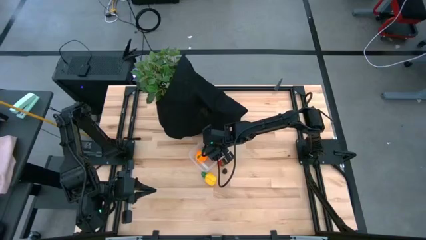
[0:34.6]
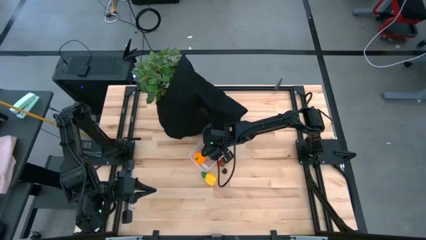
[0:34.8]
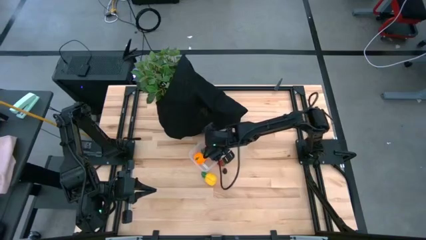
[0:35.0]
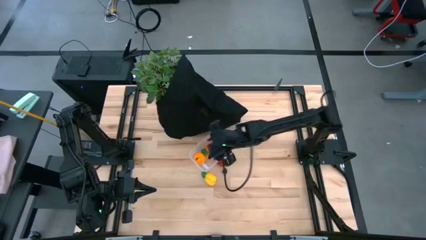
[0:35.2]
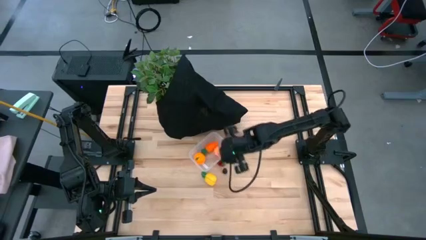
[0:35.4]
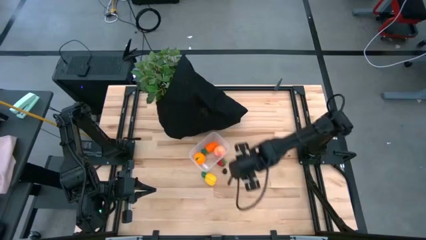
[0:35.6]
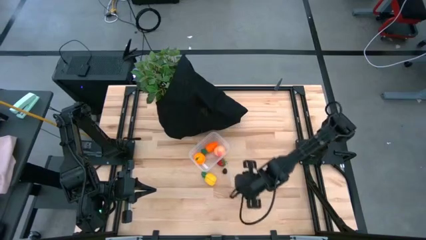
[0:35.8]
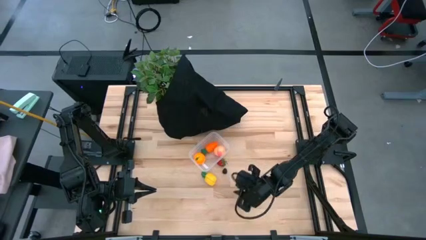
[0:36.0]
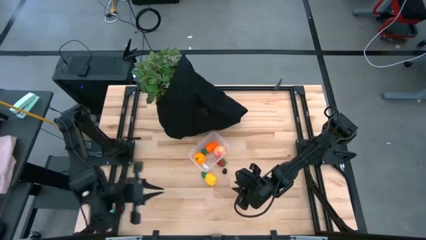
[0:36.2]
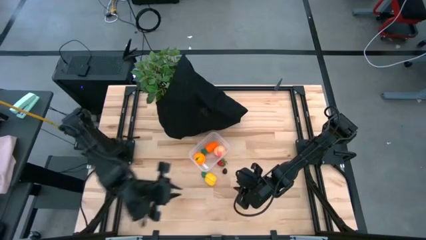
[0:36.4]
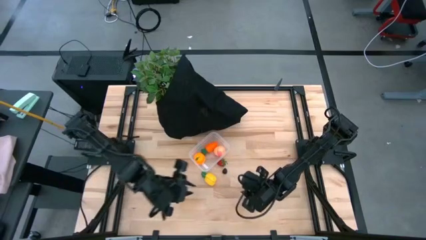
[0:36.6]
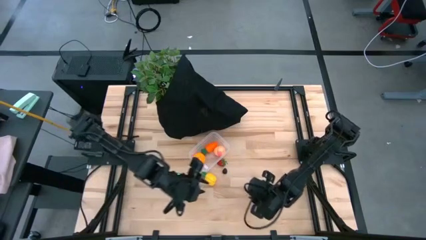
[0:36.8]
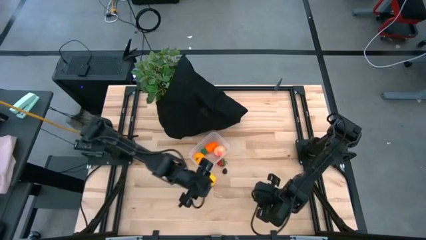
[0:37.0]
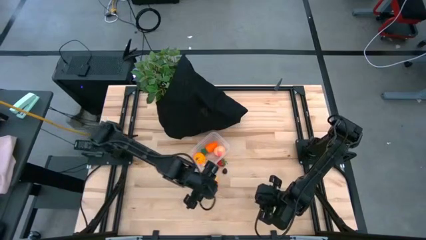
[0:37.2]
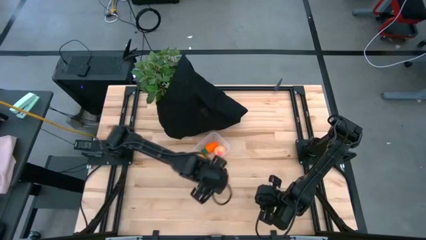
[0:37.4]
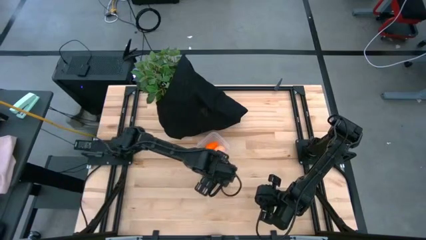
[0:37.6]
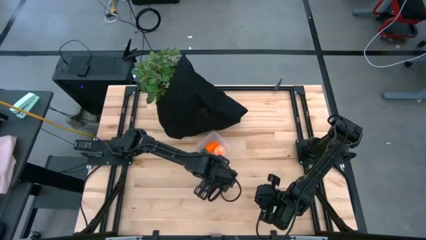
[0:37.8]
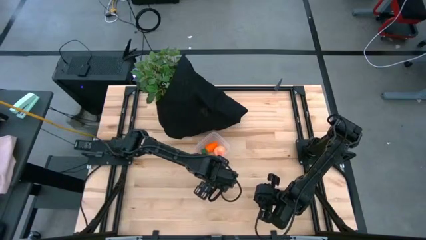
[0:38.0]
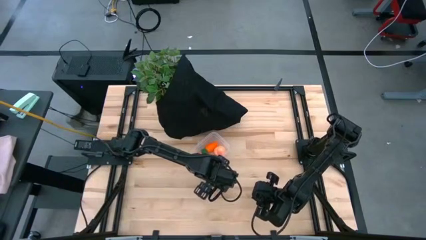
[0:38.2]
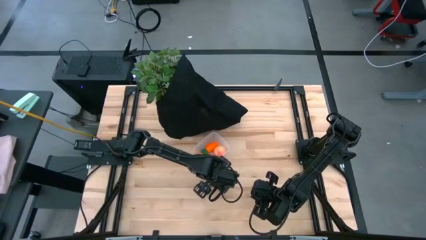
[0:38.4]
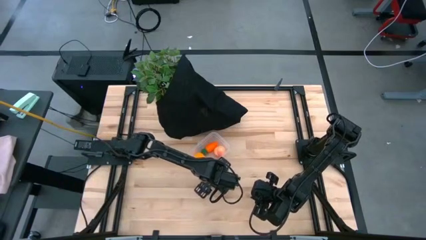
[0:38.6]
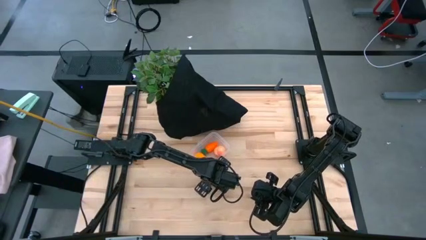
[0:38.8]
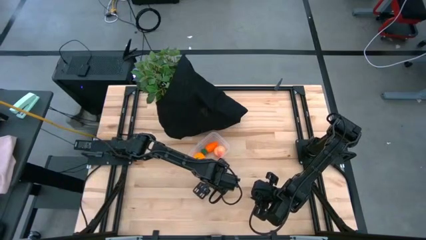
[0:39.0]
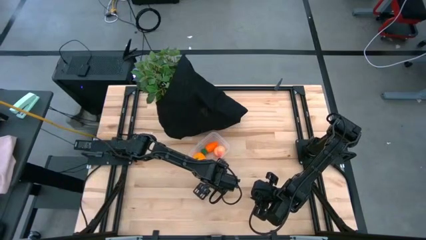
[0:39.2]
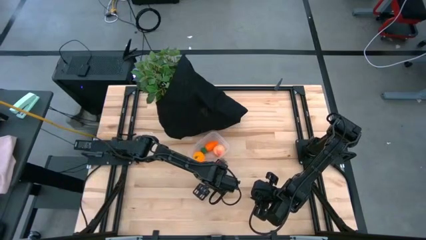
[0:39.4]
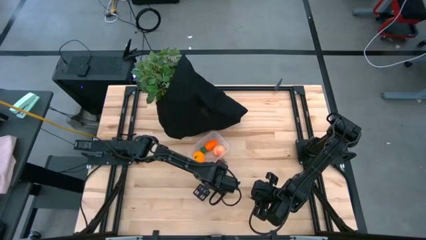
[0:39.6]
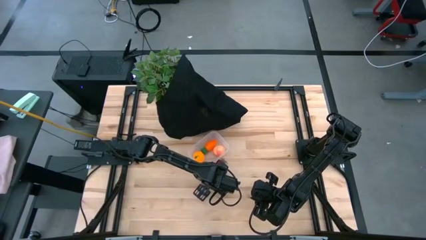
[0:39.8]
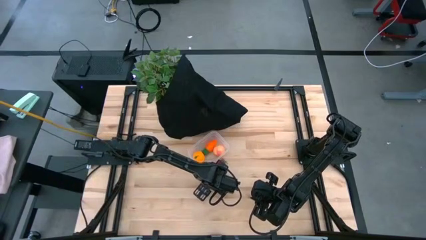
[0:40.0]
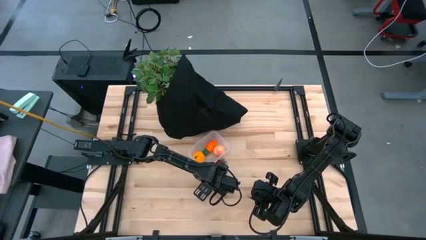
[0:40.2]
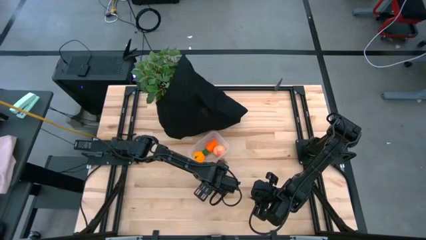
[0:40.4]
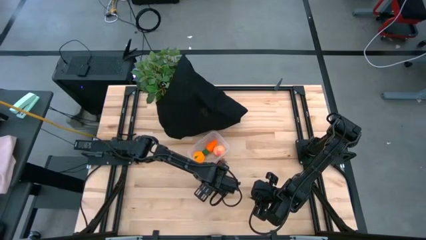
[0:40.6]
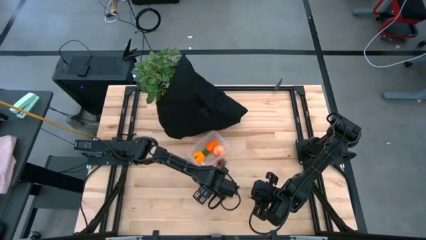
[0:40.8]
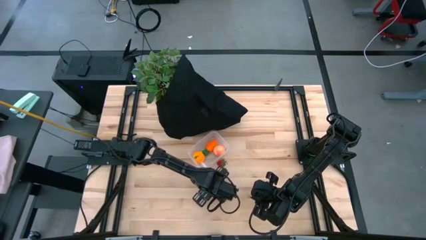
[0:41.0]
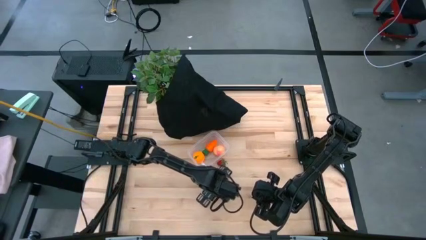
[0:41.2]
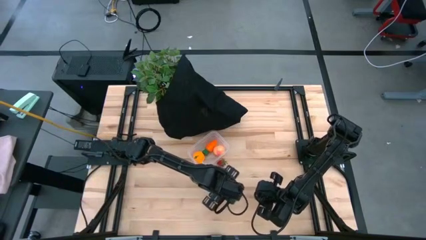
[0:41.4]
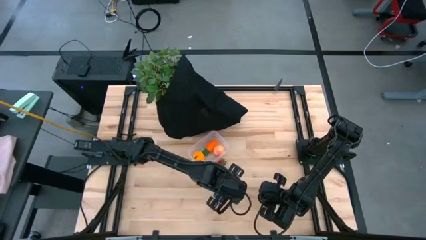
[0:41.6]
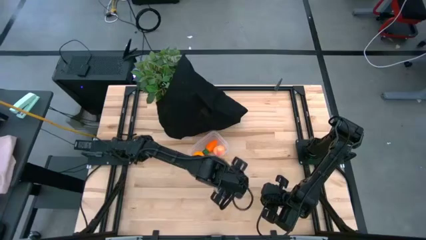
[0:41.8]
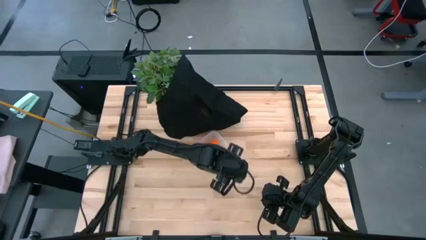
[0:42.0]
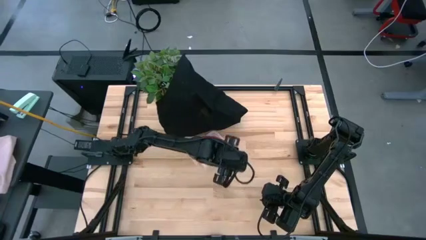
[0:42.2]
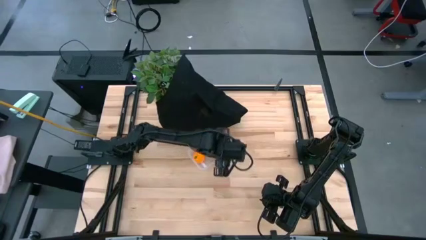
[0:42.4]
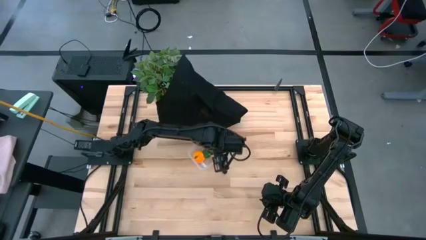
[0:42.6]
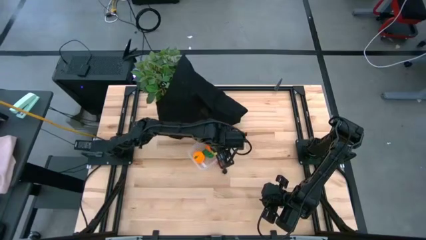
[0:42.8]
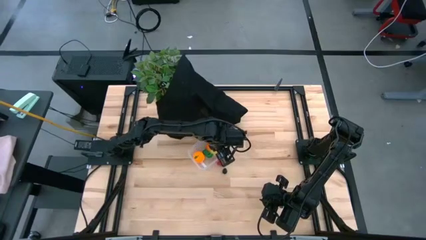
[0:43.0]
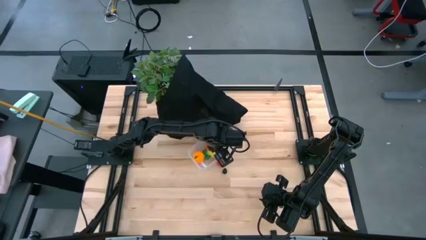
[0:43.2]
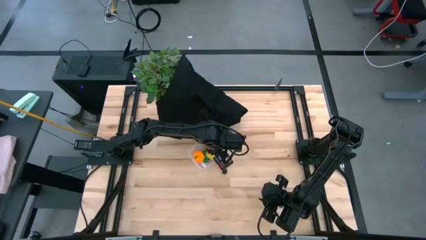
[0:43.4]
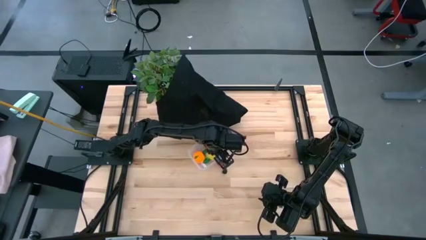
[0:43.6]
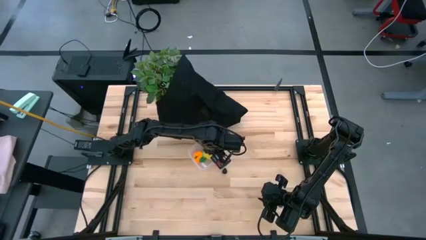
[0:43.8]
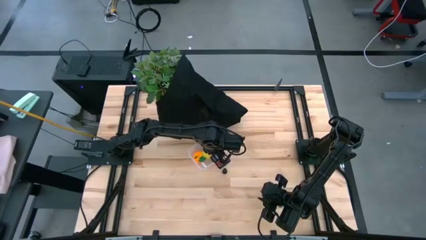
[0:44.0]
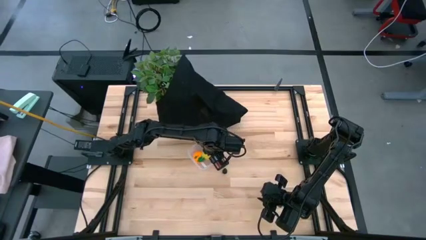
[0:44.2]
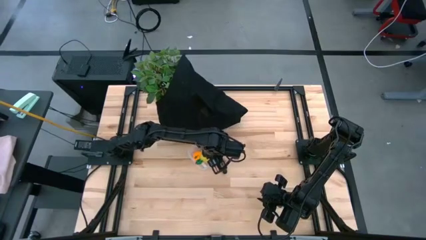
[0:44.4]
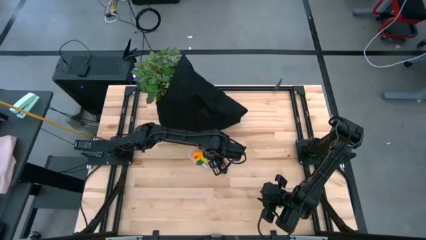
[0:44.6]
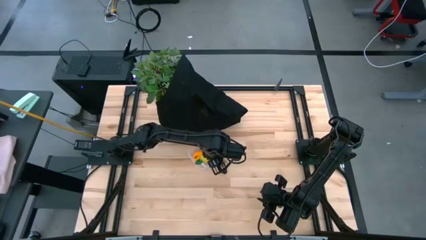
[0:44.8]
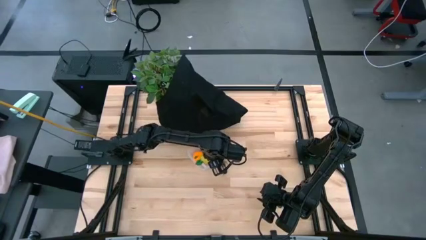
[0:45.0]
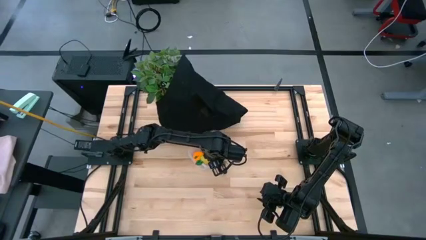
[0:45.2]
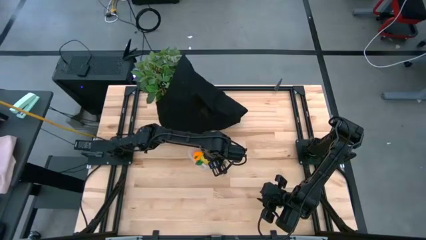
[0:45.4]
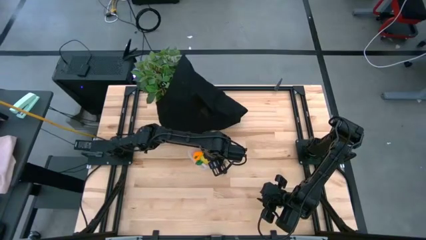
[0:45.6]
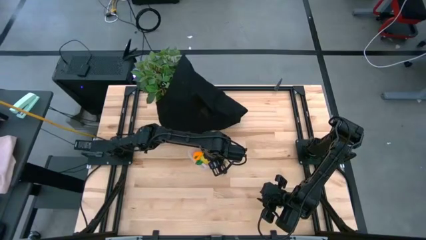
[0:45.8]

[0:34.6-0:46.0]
Task: Pick and placing Produce into tupperware
Put the yellow pineapple into the transparent bin
